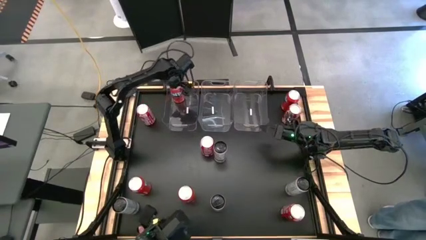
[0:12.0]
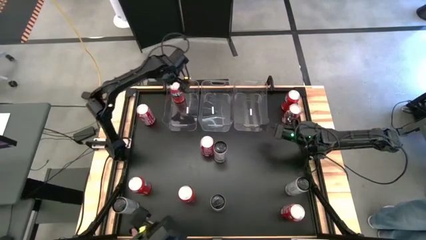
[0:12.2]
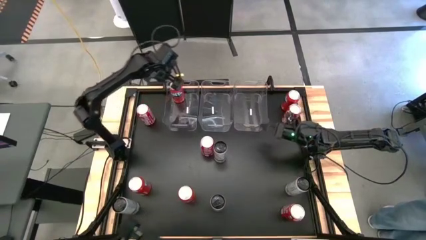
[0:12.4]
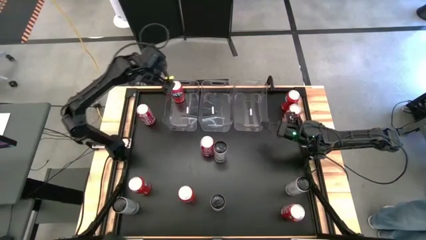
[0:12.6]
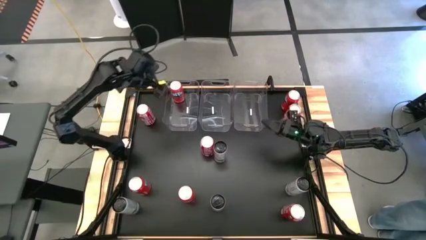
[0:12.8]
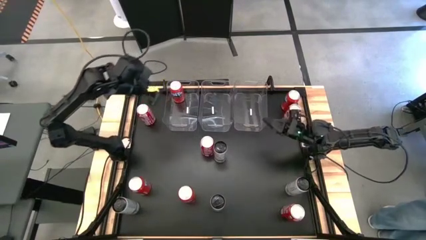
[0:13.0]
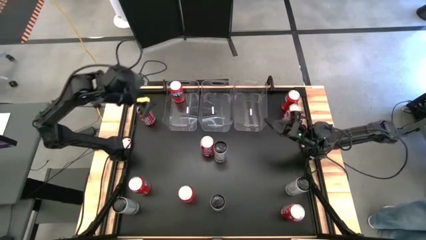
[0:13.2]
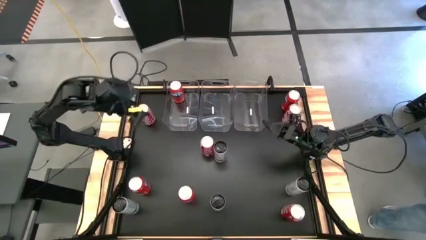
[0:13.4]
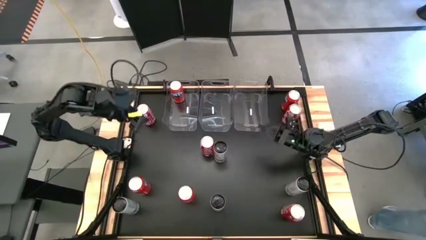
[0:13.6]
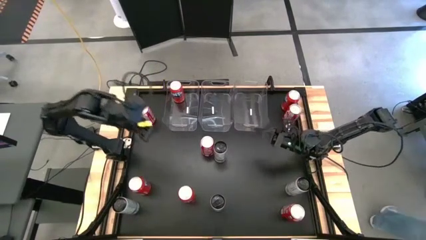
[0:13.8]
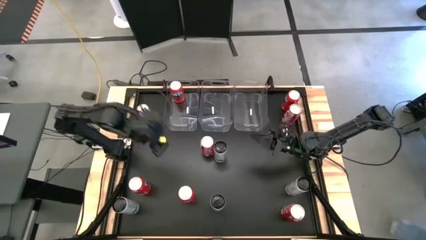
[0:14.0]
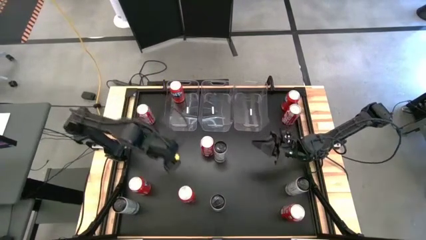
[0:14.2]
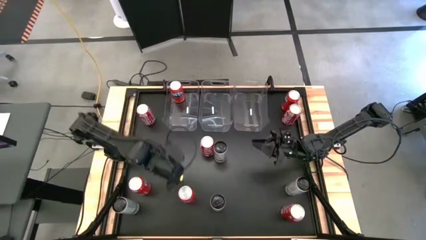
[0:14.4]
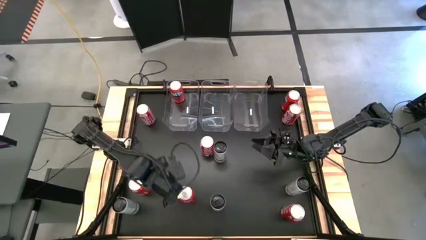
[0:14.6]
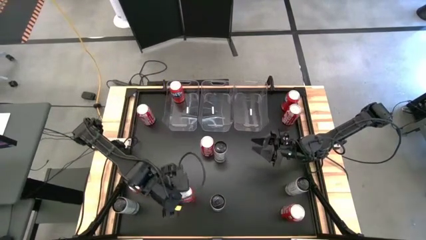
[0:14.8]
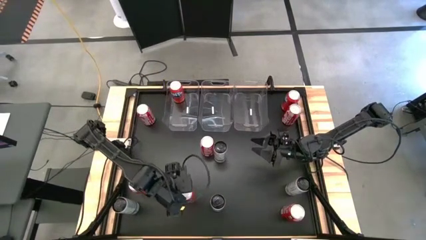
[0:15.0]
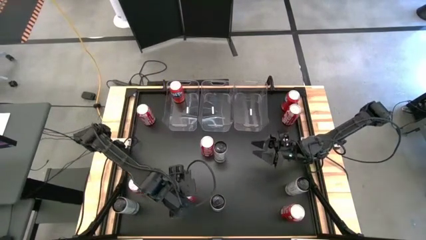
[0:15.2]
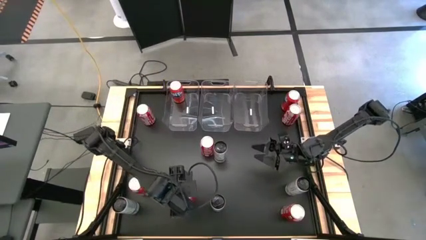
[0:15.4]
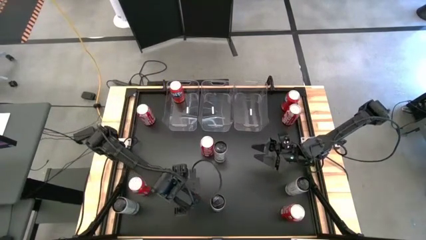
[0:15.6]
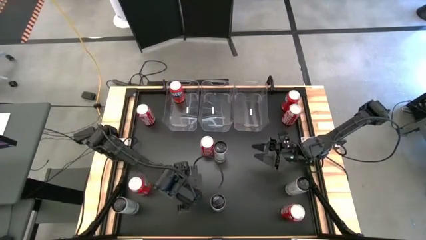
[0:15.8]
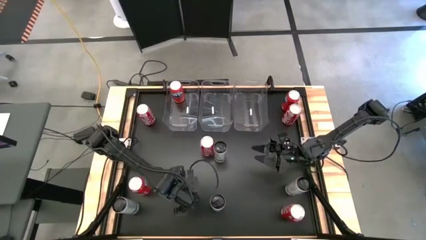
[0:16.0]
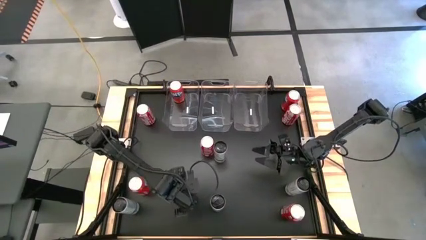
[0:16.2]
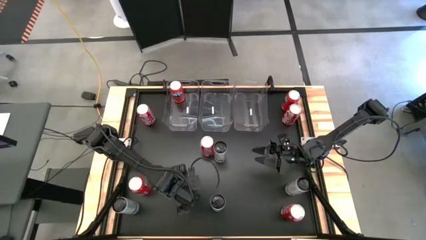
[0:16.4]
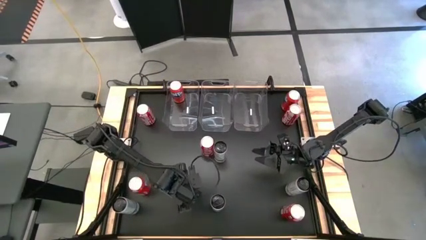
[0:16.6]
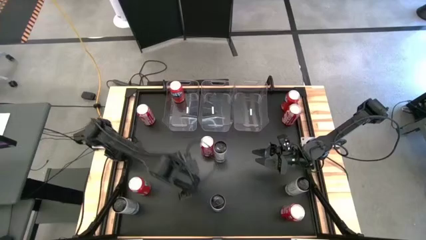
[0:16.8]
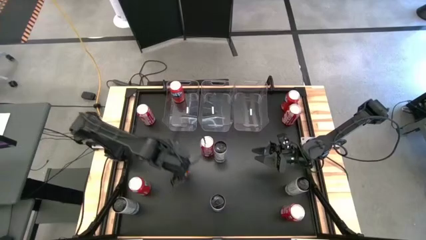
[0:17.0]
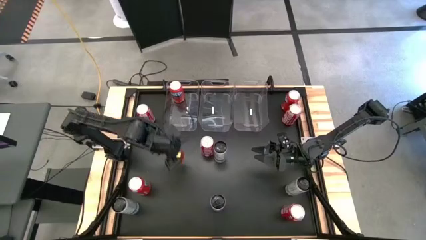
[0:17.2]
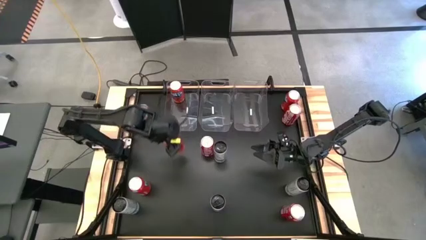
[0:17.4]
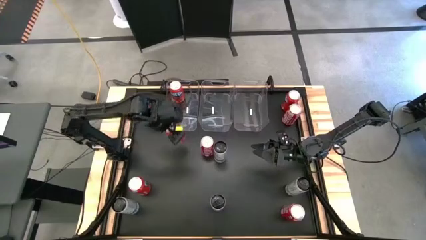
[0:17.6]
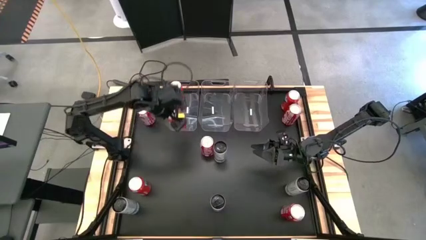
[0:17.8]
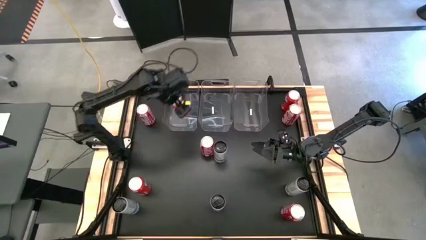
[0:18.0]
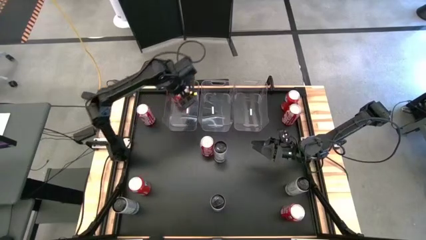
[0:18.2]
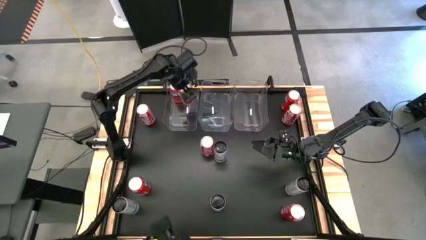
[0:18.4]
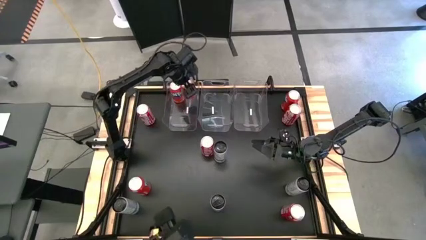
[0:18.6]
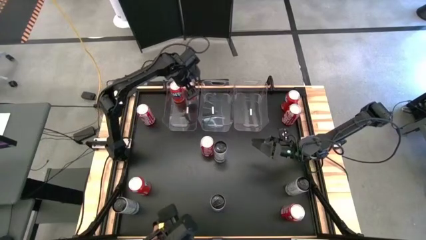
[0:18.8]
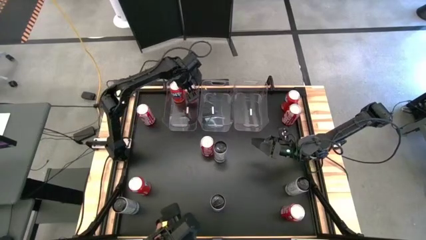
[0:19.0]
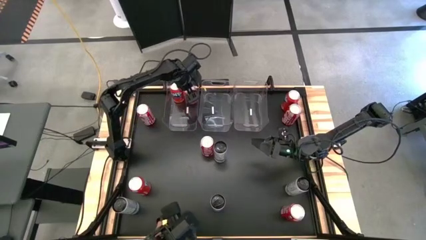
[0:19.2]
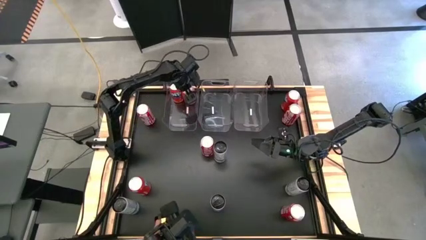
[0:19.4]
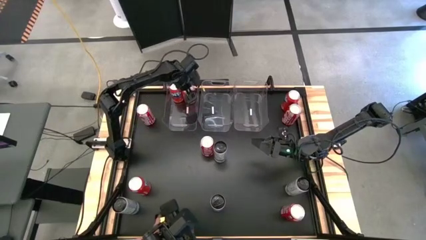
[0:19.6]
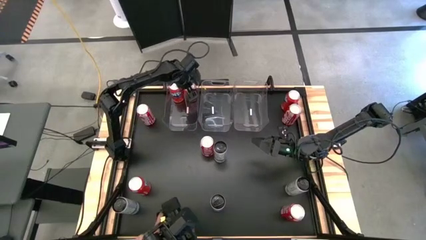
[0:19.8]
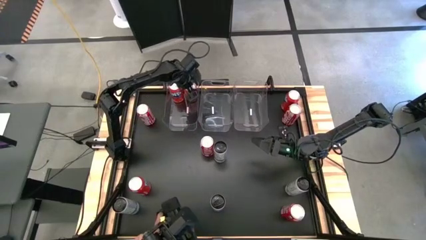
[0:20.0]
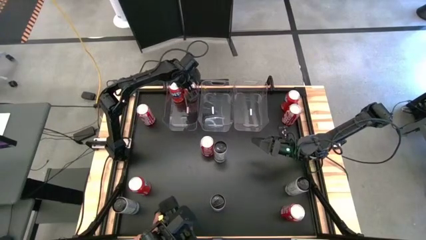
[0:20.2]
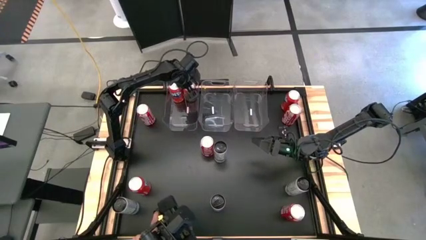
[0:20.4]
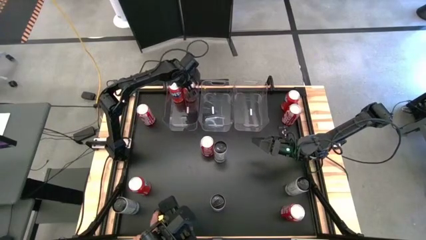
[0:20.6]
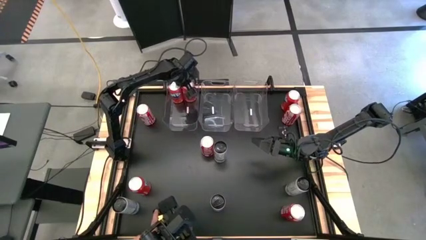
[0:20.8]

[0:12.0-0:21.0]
Task: Sort soda cans
Put the bottom right red soda can into the left transparent bin

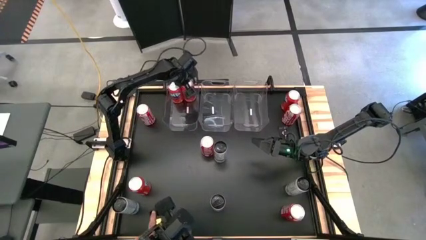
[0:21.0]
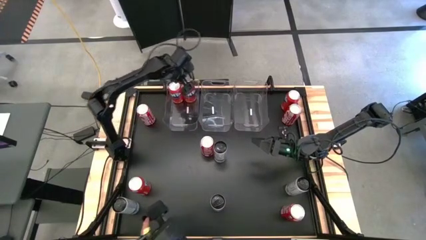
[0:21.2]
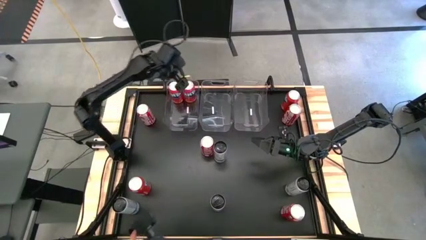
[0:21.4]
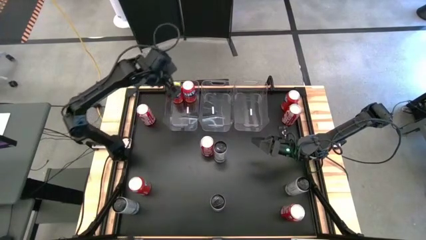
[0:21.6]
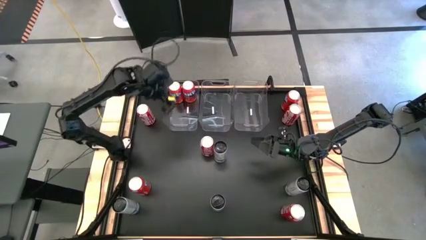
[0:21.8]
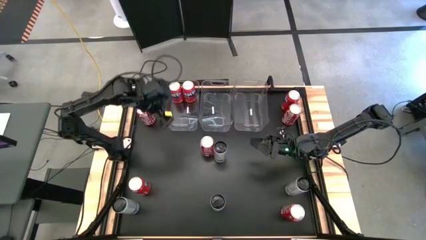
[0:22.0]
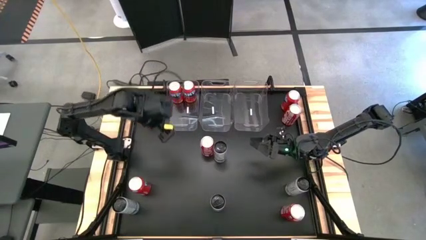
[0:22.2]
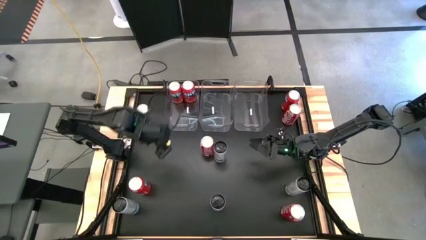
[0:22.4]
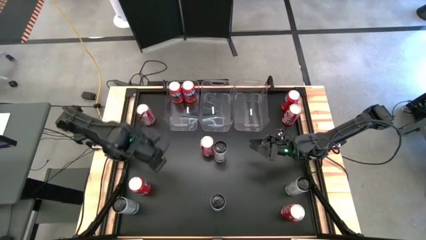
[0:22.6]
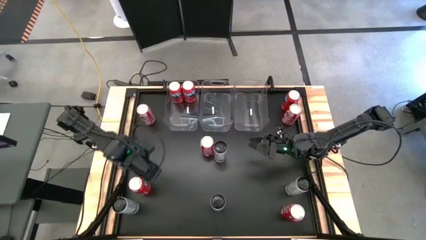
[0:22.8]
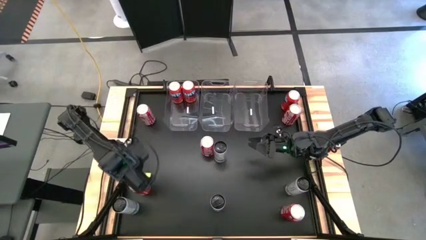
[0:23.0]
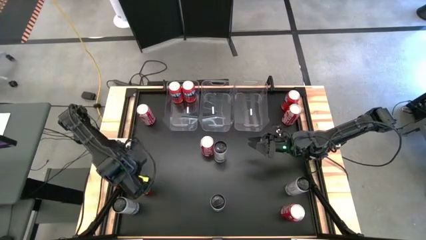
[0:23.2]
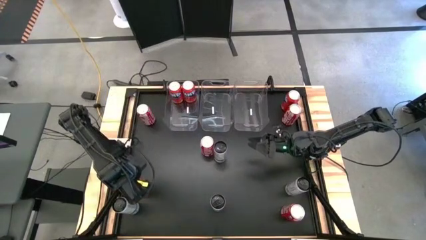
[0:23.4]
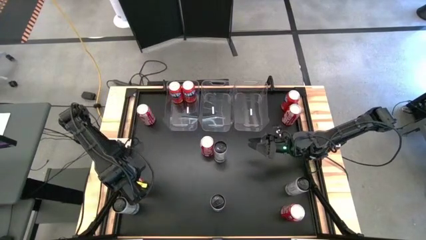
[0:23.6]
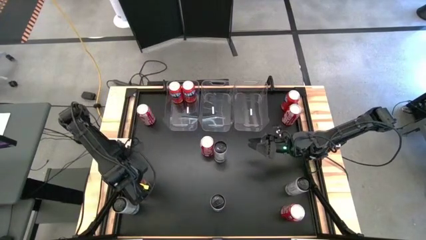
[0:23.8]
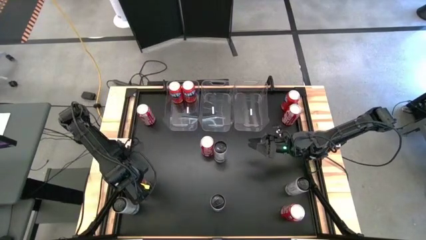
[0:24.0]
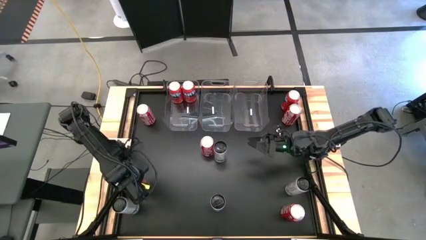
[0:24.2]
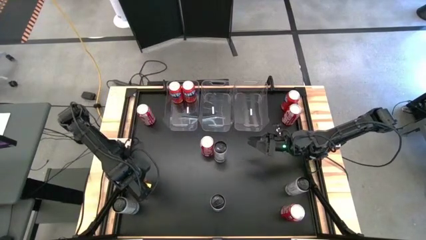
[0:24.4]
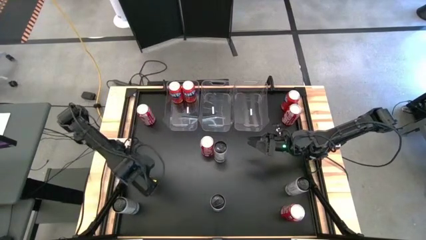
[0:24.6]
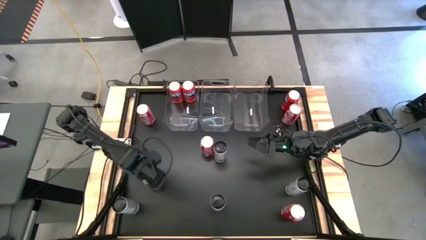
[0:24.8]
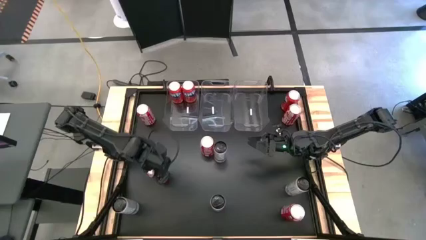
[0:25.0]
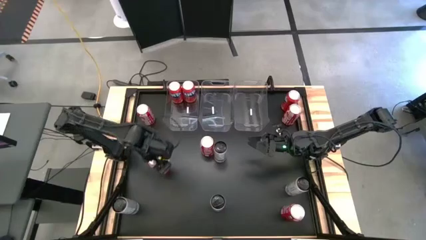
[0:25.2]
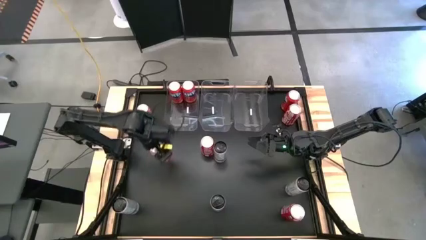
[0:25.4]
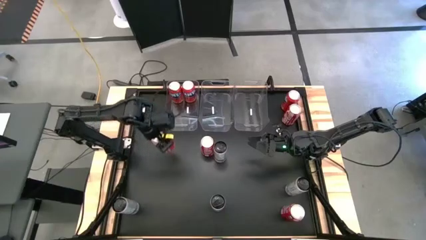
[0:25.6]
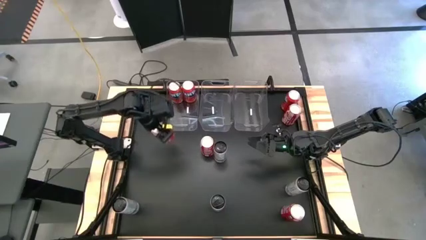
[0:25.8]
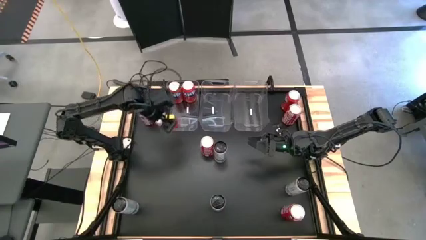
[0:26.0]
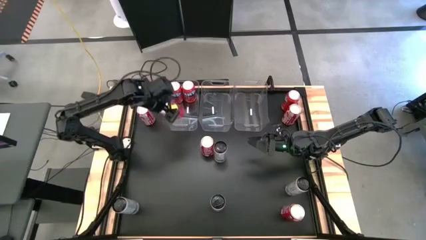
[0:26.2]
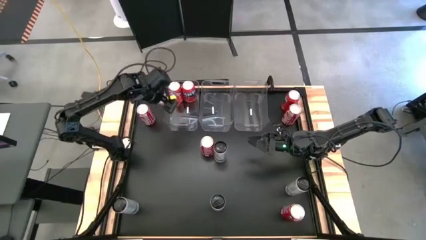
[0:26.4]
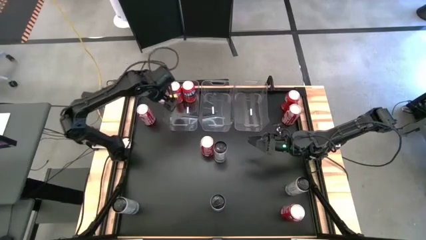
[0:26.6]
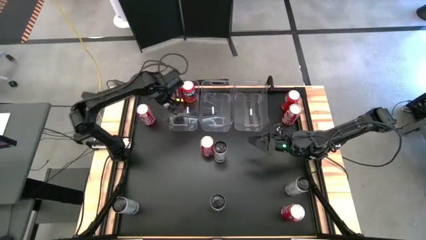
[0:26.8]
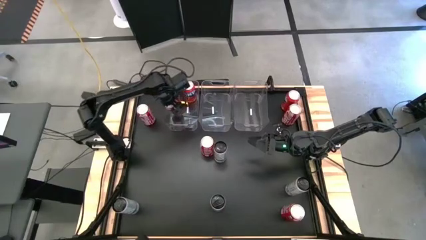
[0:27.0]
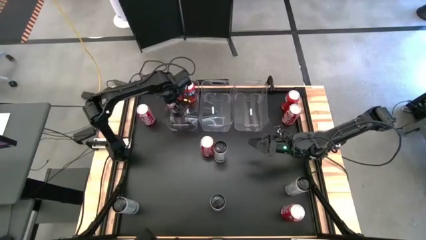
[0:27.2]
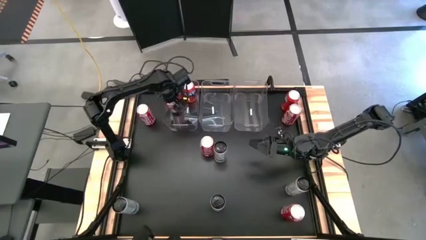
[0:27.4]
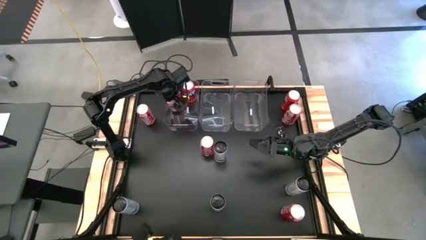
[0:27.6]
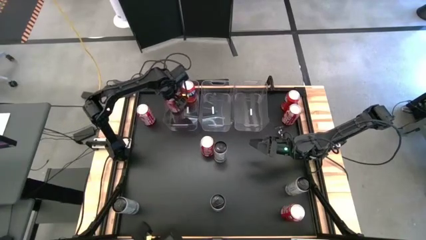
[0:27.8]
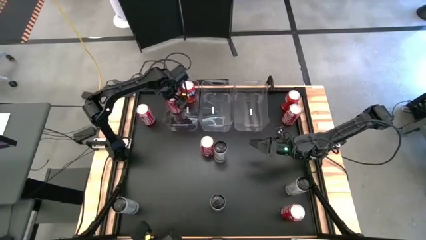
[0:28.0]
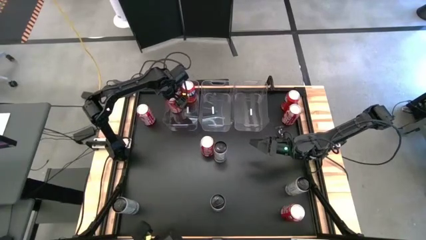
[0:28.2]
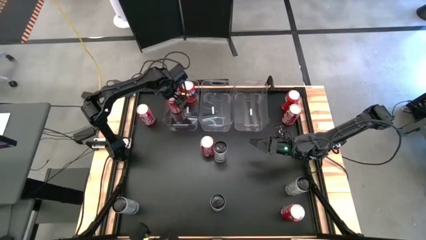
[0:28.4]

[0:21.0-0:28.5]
Put the left red soda can into the left transparent bin
